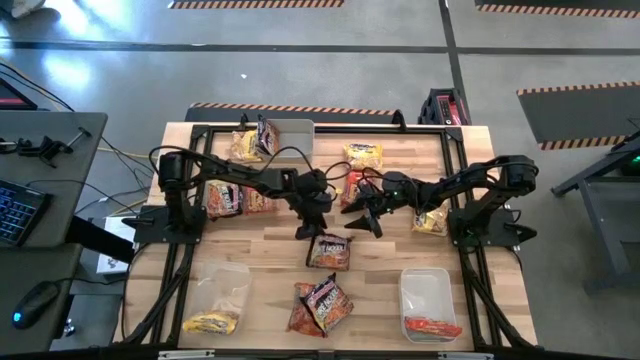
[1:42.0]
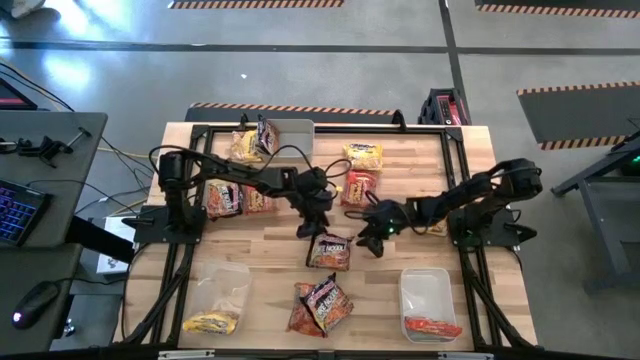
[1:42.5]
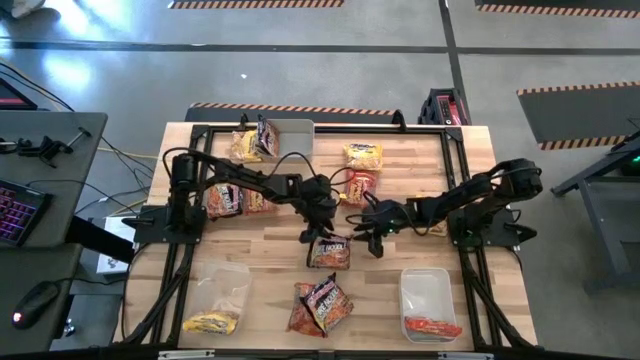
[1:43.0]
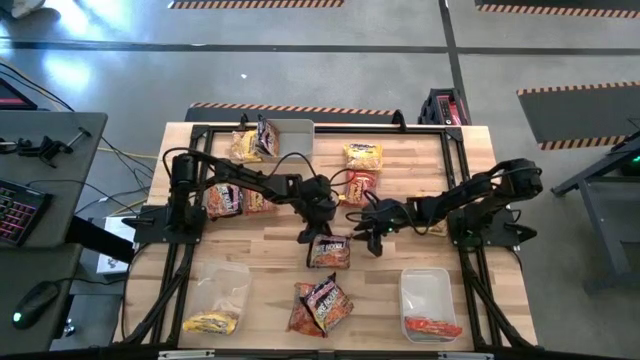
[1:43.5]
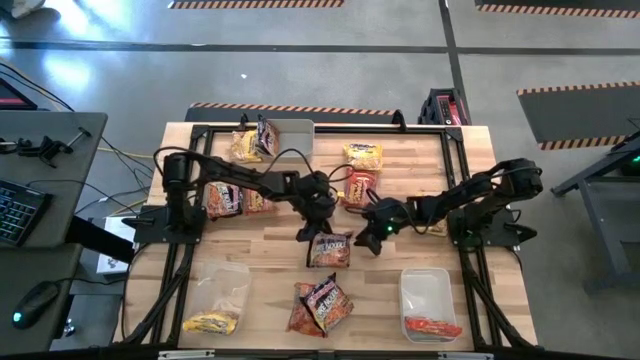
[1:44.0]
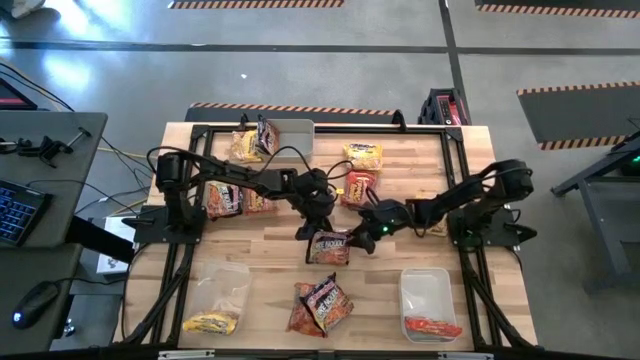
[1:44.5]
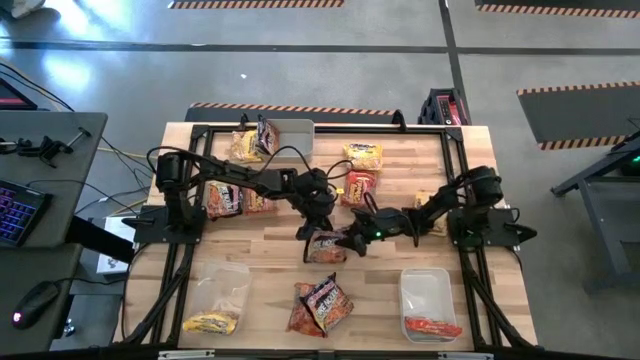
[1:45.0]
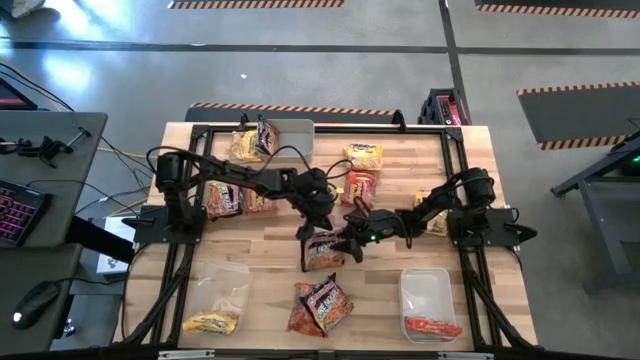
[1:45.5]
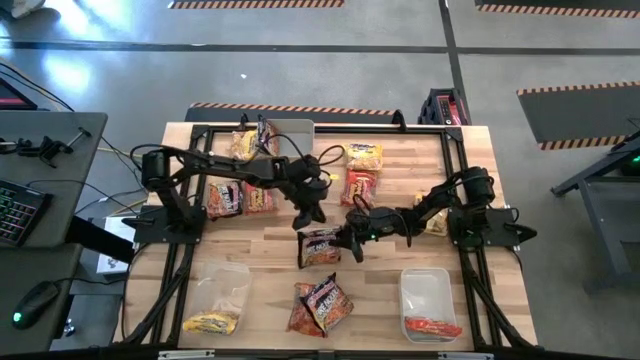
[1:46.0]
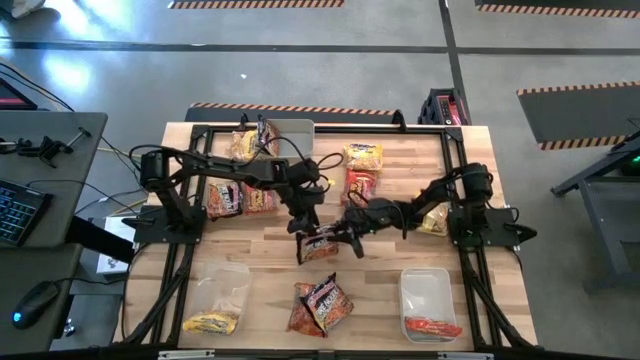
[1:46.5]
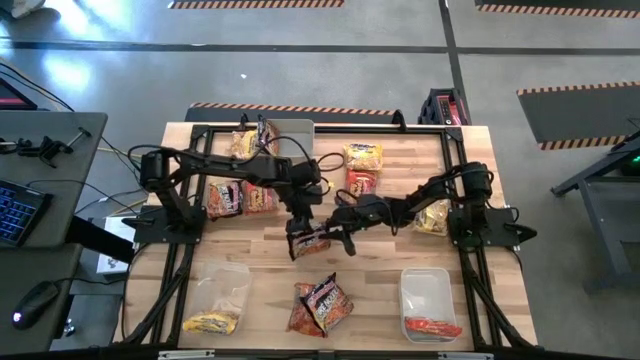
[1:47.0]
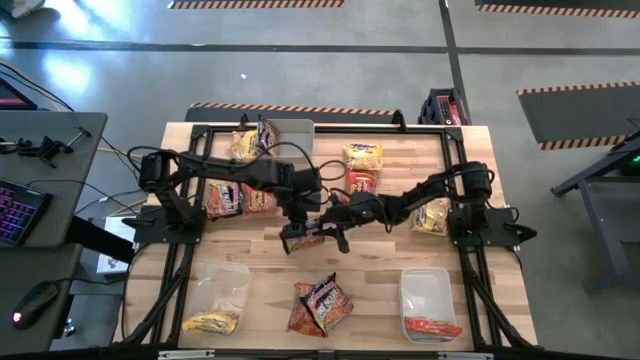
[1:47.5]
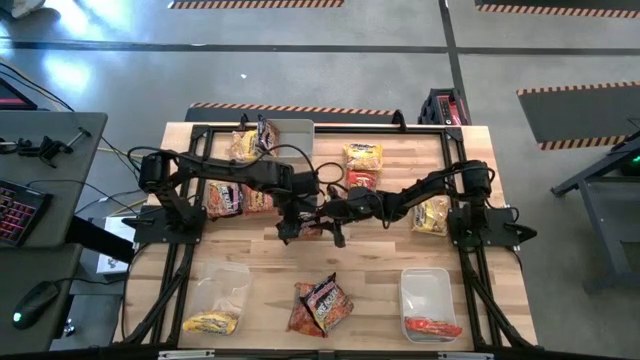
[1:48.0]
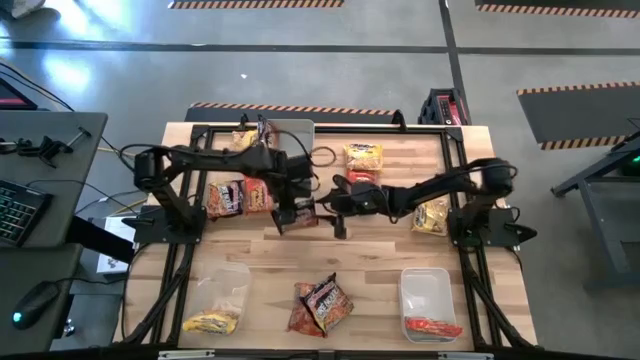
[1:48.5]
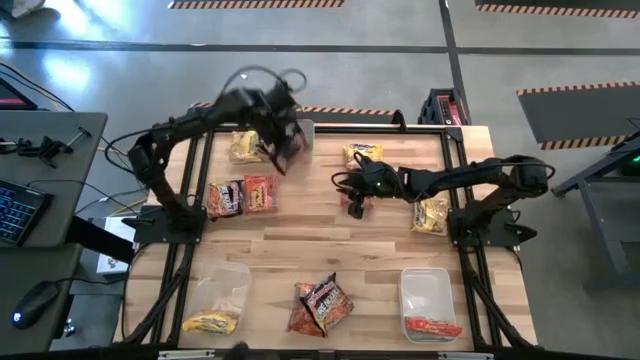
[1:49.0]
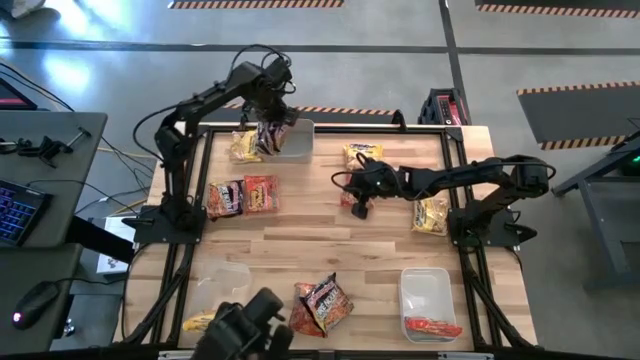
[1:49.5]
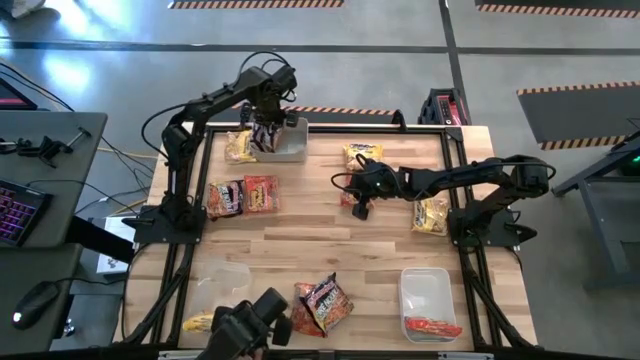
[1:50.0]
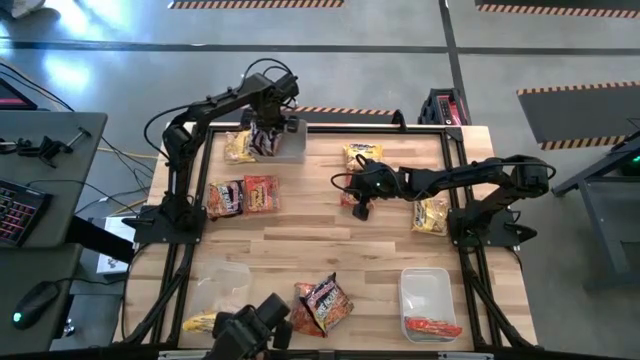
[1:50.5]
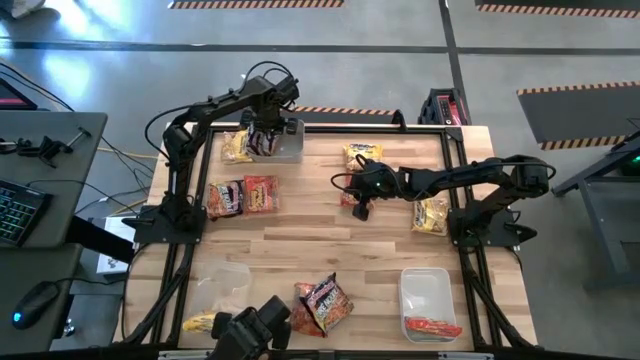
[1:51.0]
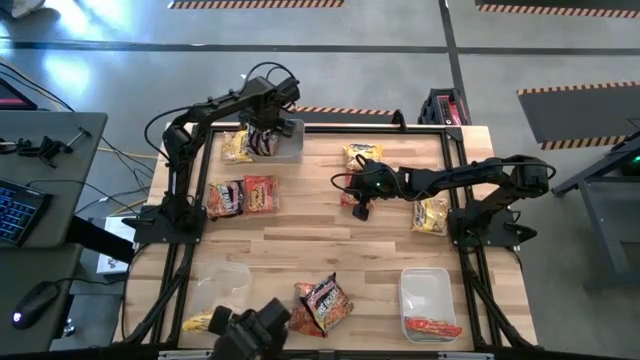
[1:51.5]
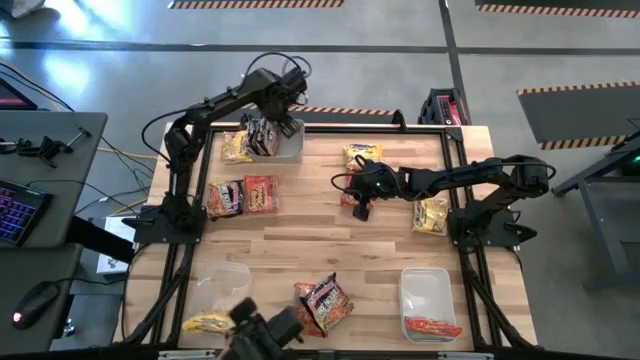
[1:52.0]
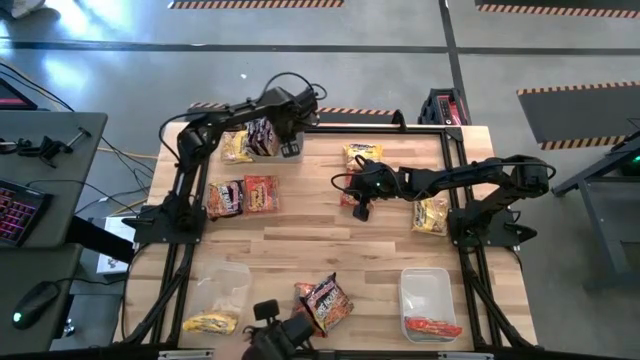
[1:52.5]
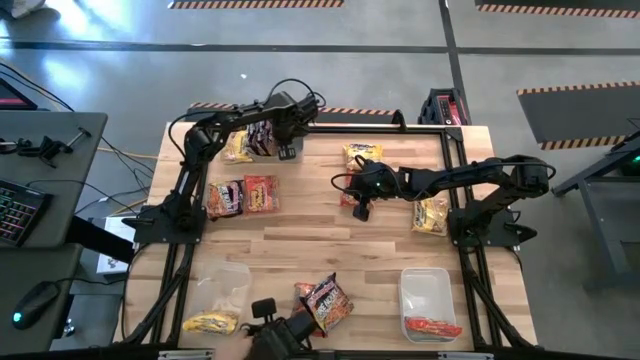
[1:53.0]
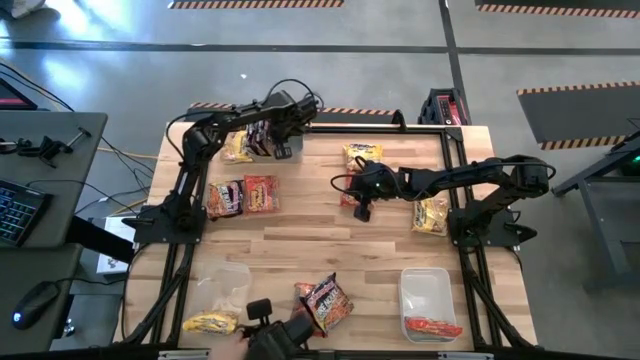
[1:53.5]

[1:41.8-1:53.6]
Task: Sort Maruchan noodles
Put the middle black noodle pack into the gray bin

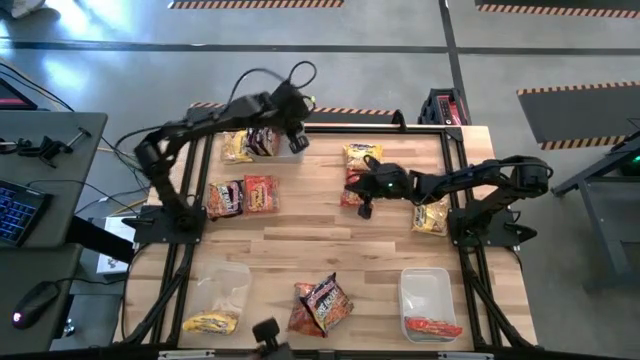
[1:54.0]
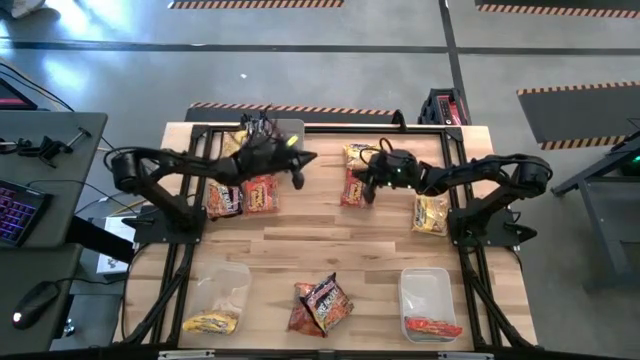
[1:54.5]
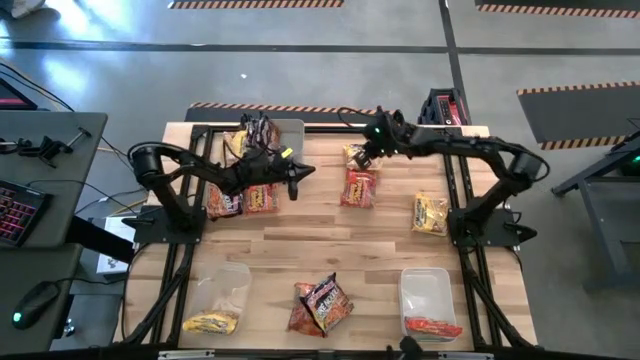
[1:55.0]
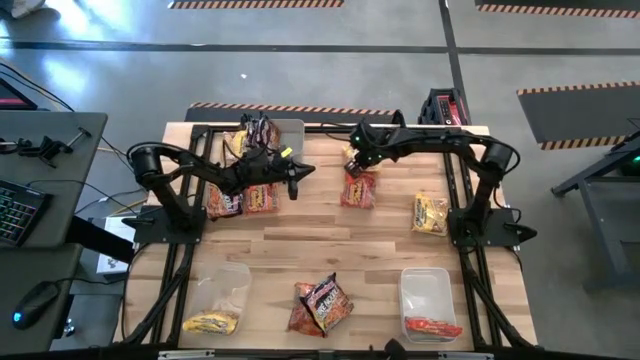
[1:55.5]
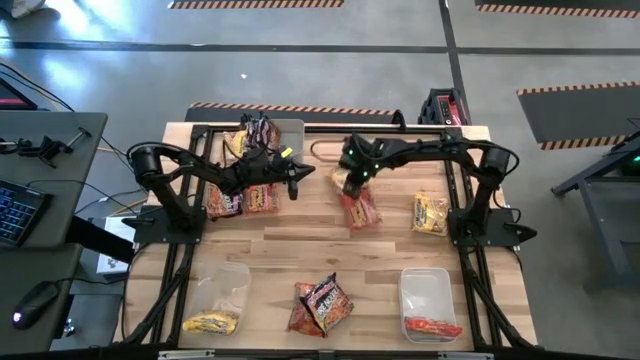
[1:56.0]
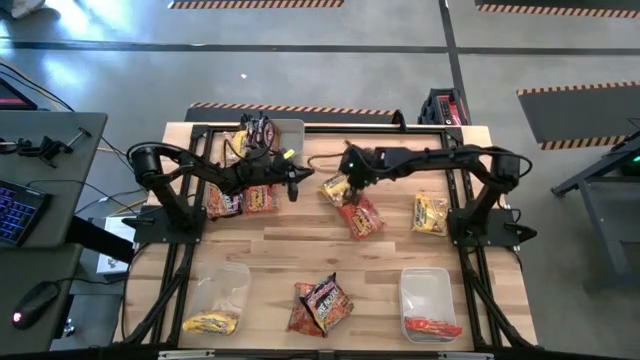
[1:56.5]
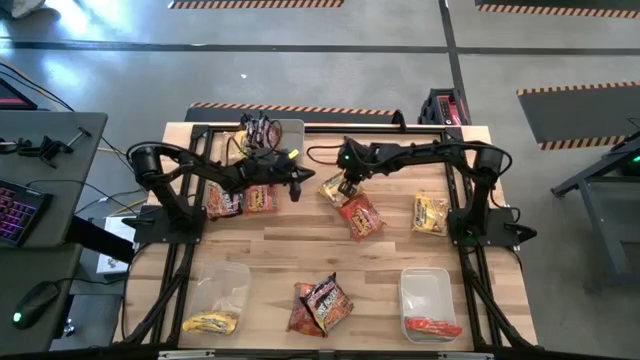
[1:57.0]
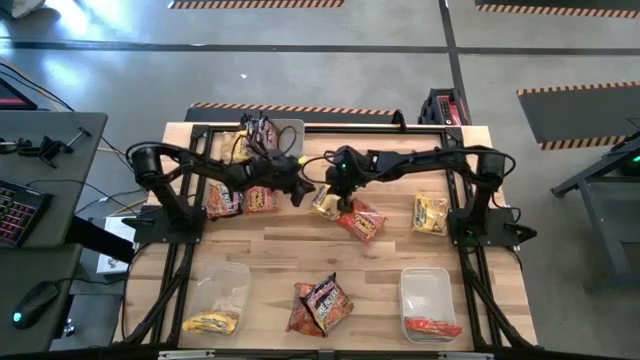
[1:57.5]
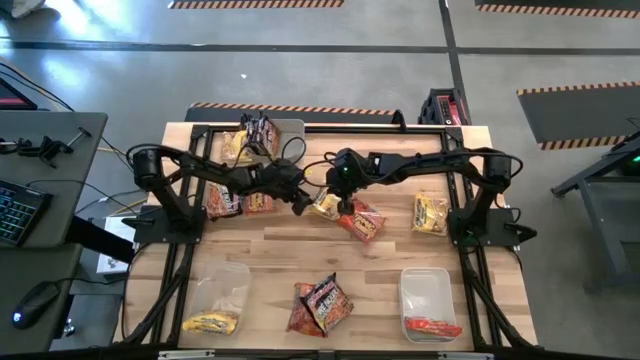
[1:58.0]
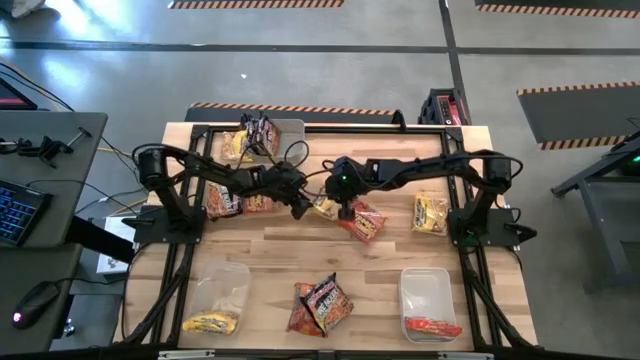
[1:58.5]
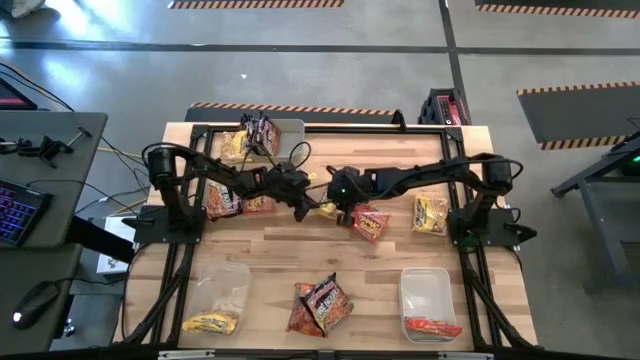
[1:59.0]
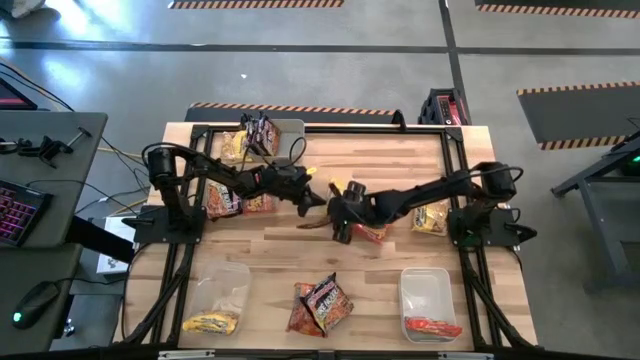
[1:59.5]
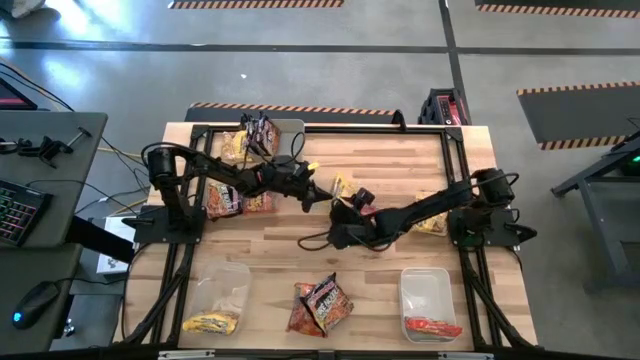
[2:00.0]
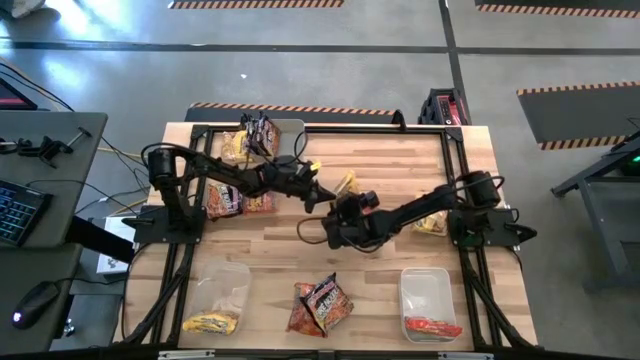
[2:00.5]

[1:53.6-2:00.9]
Put the top right yellow noodle pack into the transparent bin
